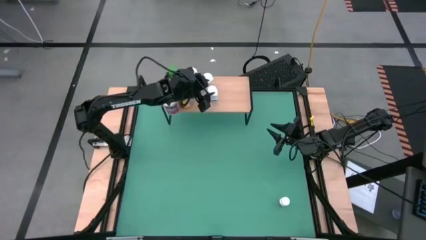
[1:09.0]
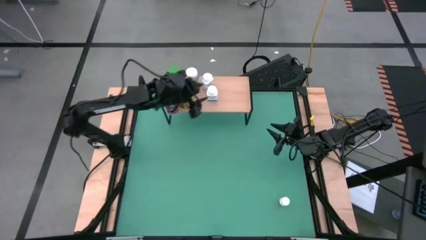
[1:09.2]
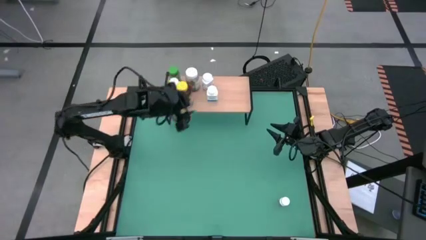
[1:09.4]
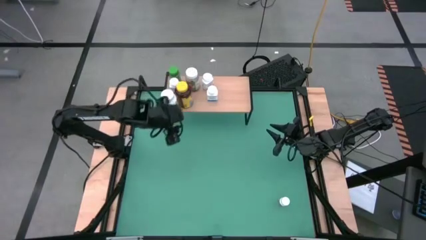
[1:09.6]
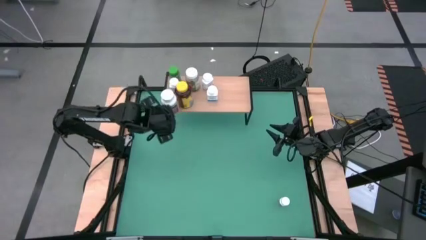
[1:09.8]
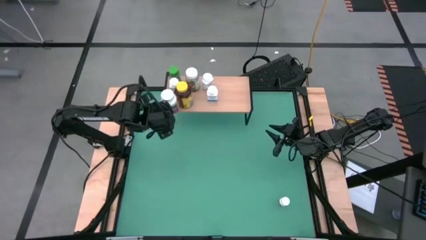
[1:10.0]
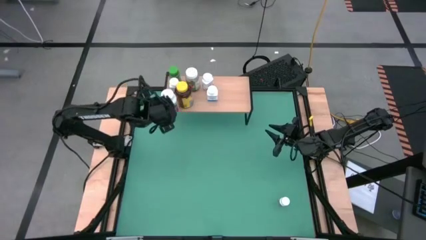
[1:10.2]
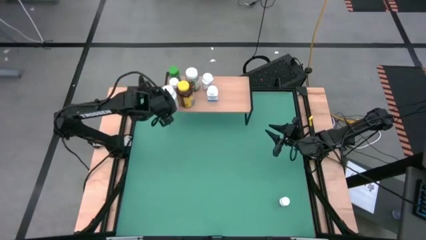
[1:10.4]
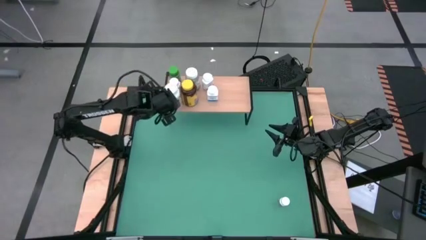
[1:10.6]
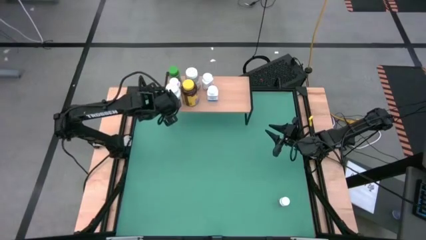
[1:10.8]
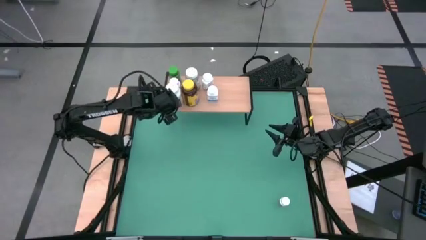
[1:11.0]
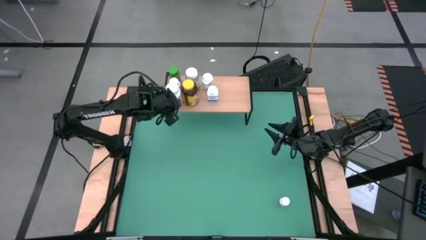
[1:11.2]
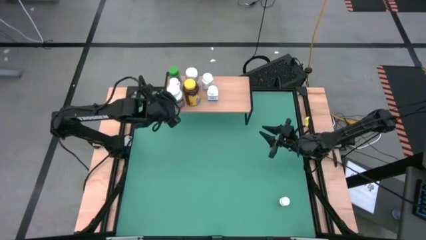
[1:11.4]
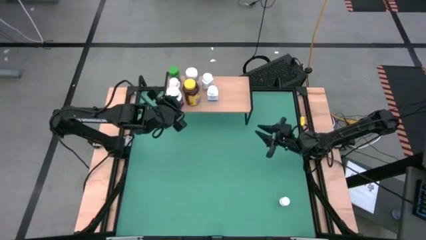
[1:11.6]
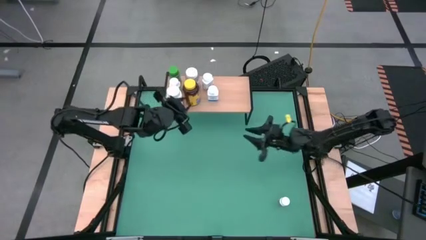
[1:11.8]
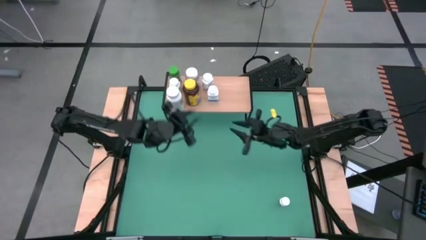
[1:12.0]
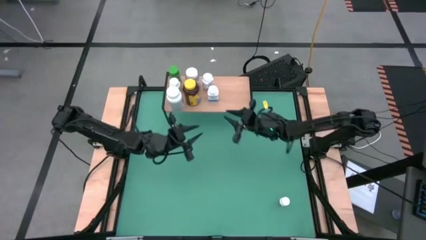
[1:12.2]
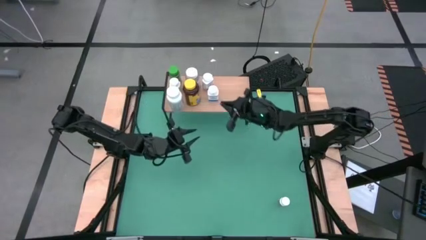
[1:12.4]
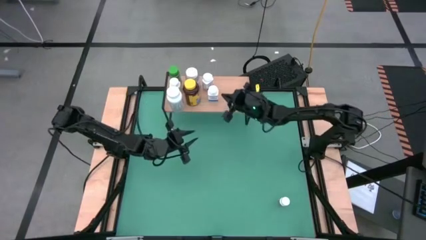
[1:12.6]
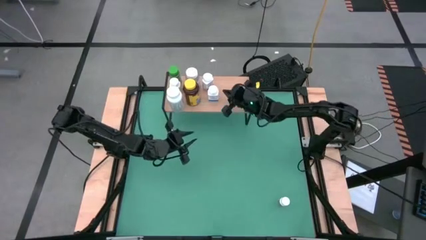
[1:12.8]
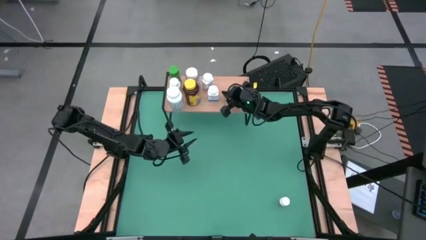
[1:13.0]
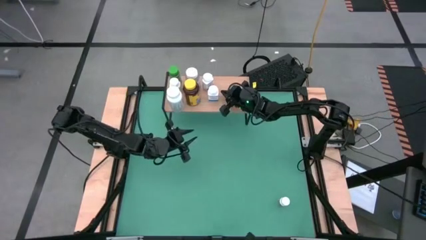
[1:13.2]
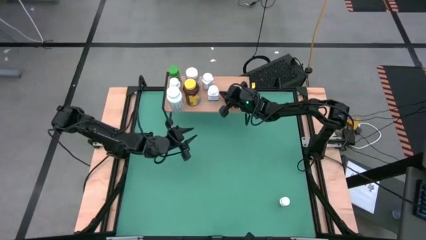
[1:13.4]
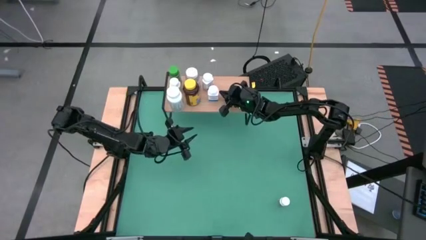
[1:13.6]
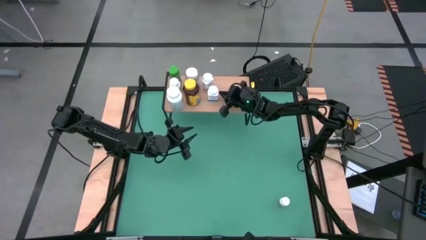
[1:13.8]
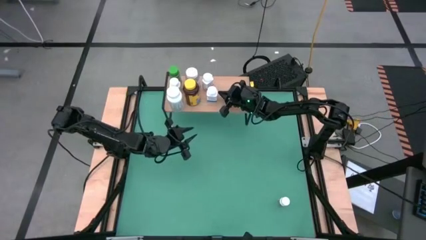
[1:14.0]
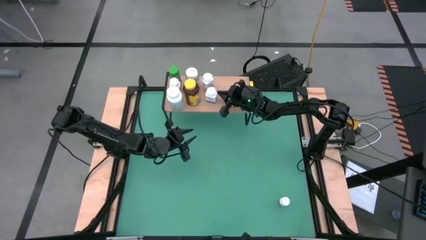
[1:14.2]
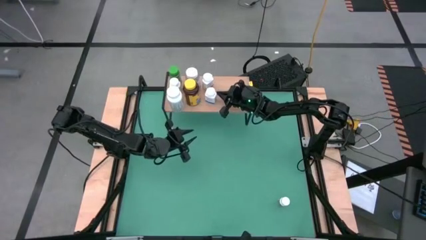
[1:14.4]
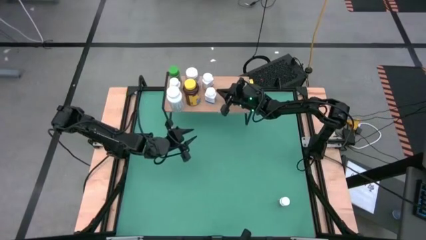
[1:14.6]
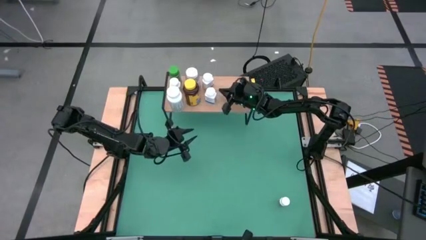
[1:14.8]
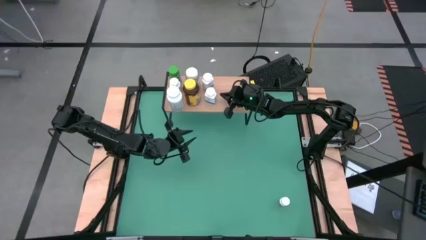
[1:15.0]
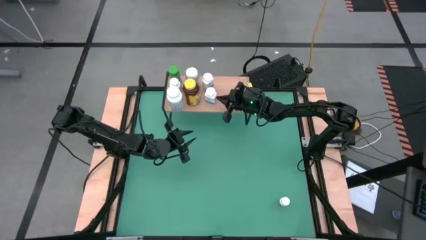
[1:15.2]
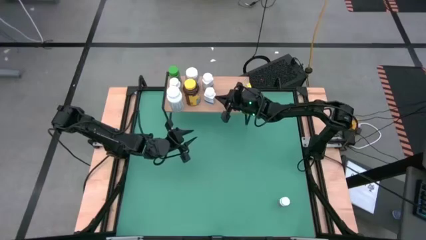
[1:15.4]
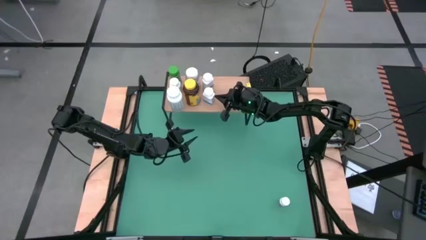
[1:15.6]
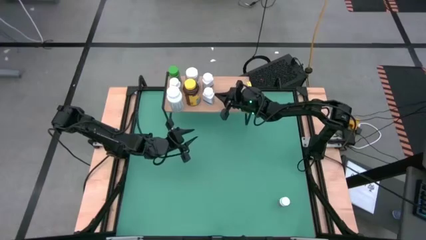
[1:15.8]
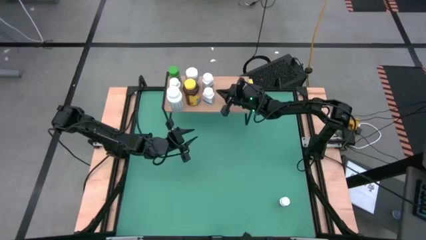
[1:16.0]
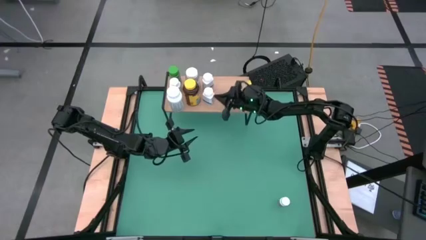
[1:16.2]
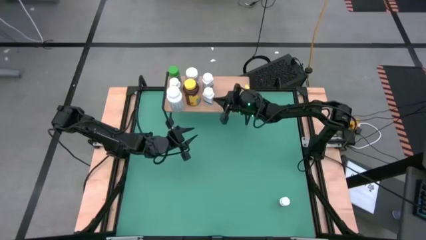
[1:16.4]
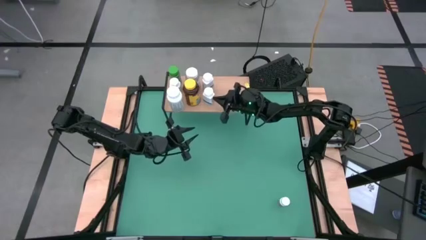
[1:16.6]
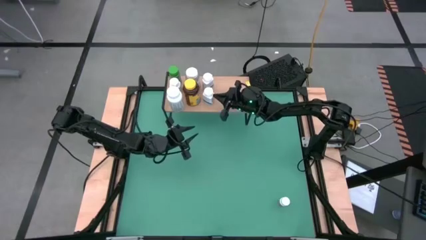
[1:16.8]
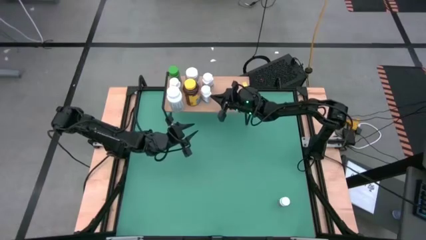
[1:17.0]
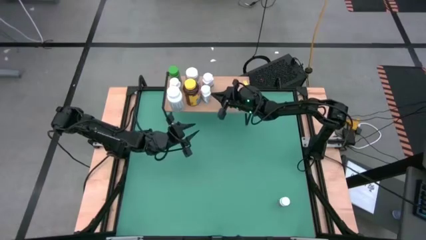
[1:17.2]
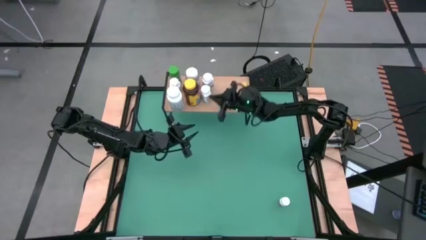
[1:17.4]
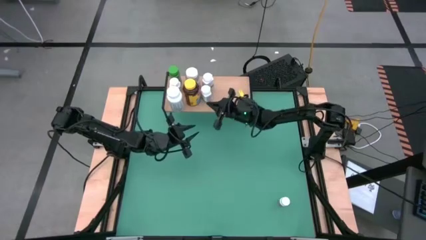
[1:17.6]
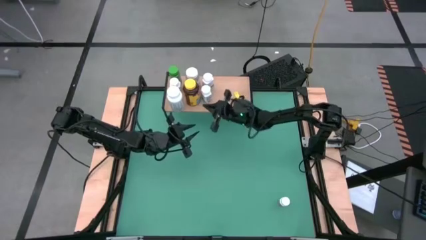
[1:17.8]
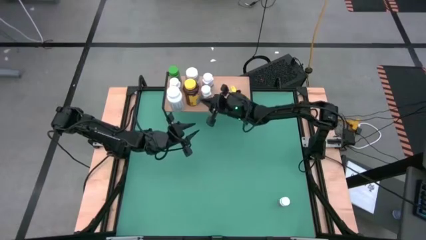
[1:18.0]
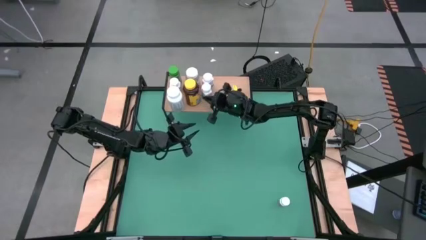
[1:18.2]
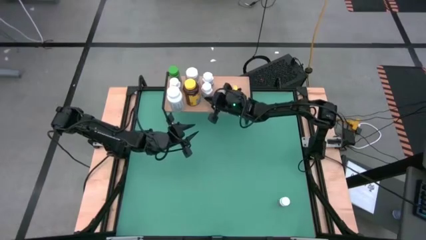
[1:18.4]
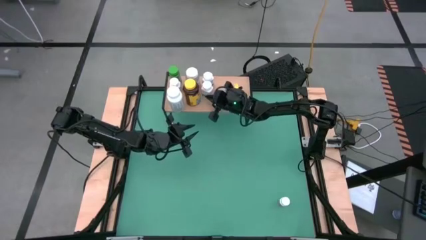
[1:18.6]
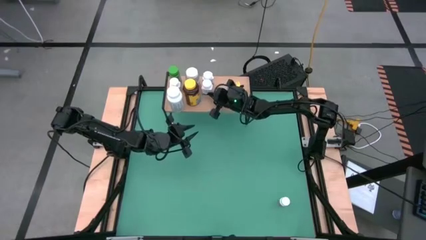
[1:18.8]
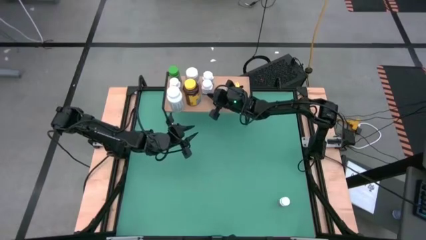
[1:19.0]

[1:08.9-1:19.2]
Task: Pick and place medicine bottles onto shelf by color
Adjust the white supplement bottles

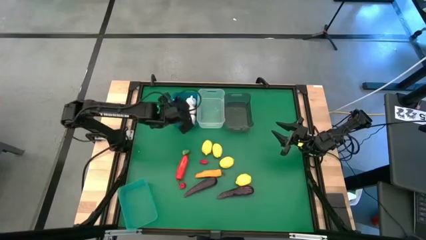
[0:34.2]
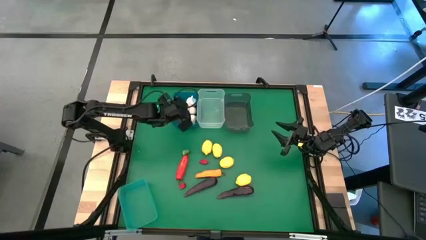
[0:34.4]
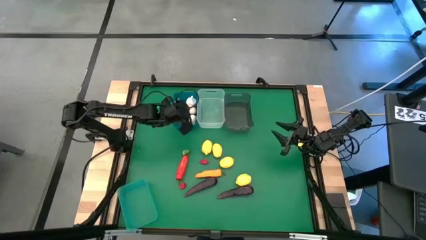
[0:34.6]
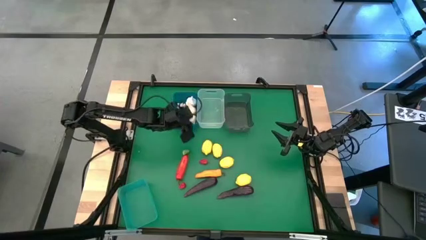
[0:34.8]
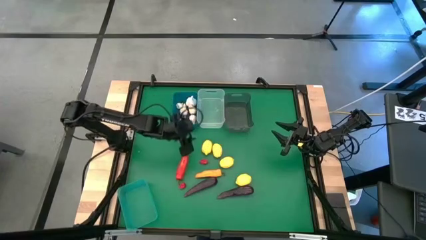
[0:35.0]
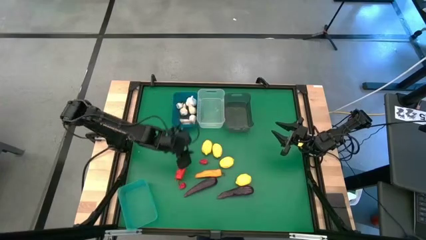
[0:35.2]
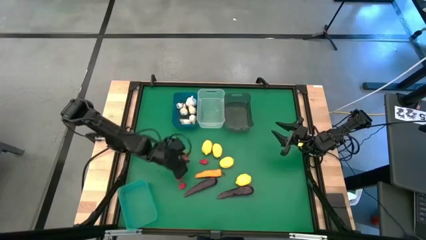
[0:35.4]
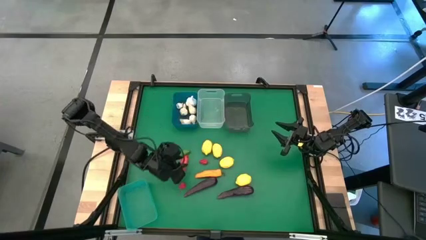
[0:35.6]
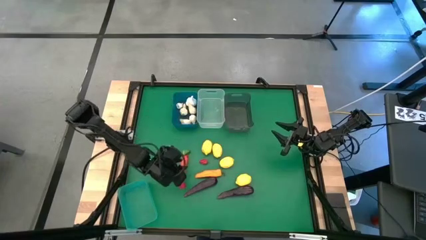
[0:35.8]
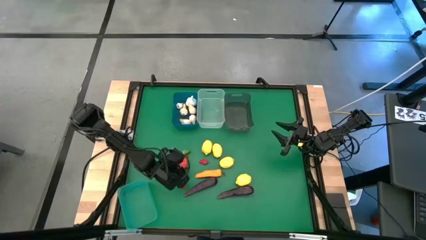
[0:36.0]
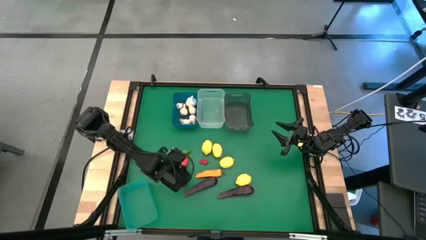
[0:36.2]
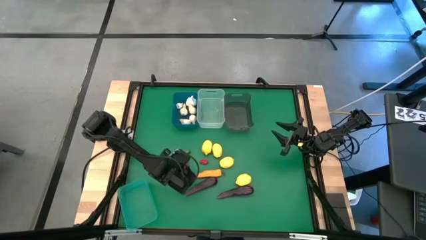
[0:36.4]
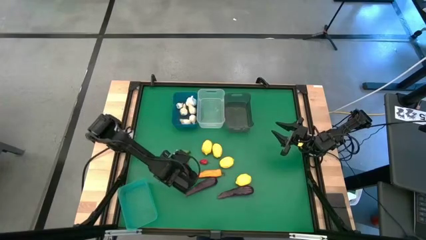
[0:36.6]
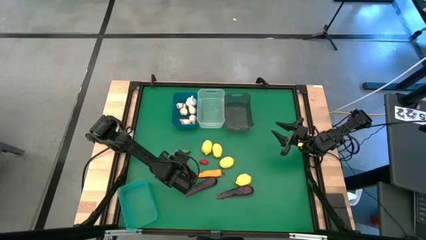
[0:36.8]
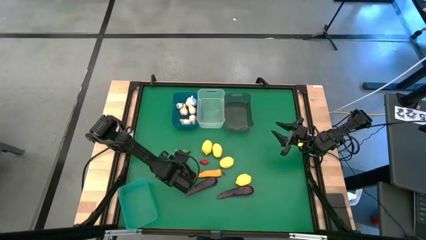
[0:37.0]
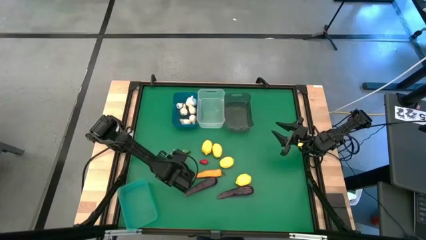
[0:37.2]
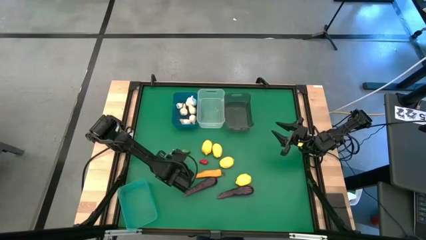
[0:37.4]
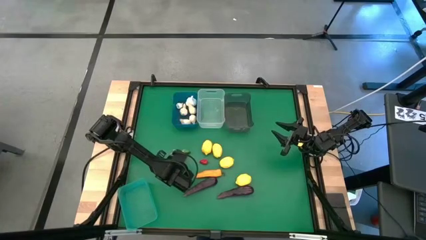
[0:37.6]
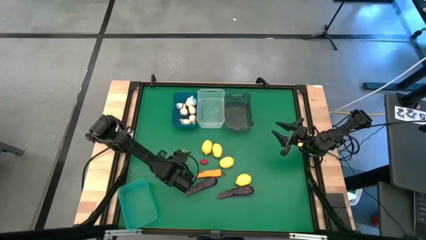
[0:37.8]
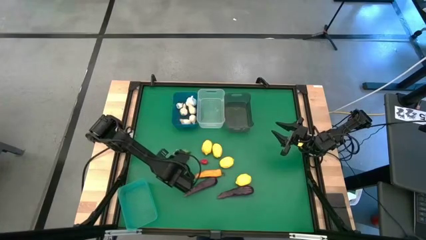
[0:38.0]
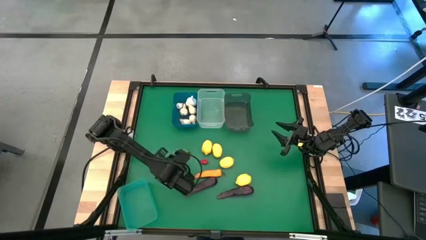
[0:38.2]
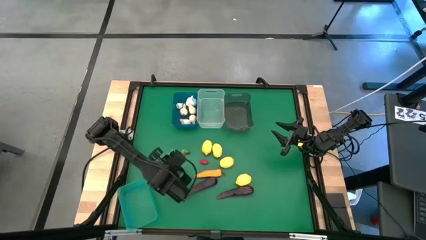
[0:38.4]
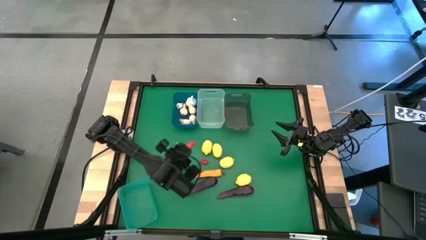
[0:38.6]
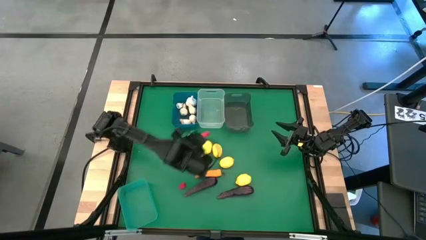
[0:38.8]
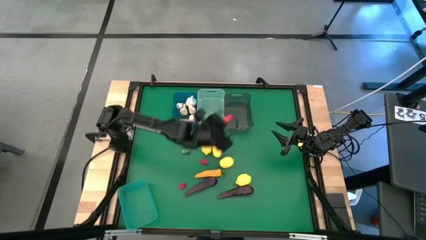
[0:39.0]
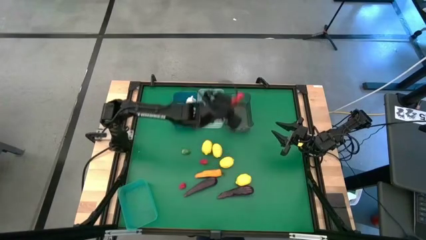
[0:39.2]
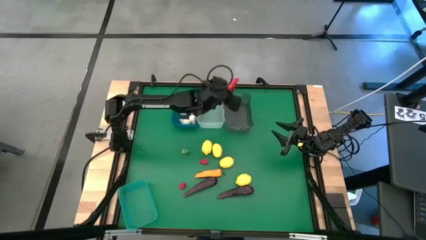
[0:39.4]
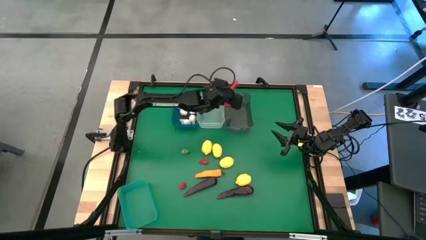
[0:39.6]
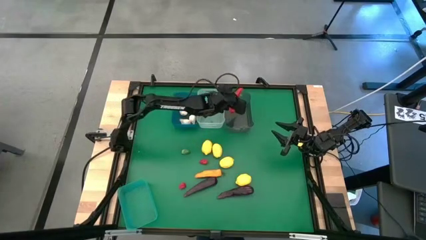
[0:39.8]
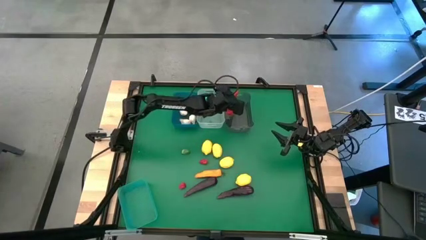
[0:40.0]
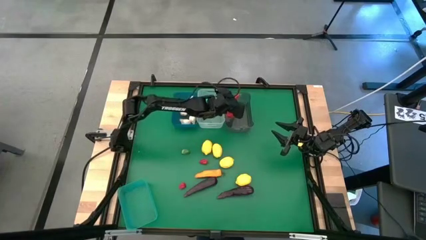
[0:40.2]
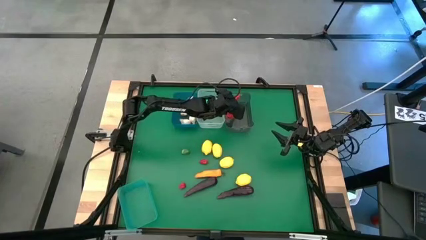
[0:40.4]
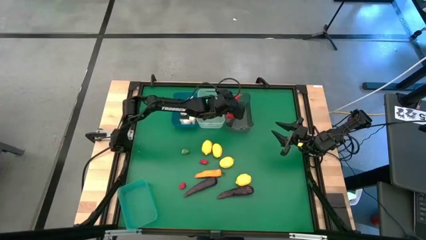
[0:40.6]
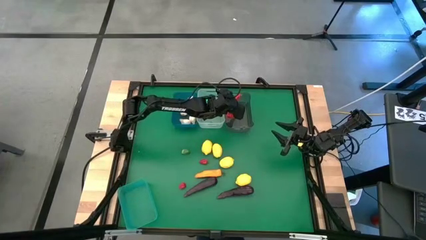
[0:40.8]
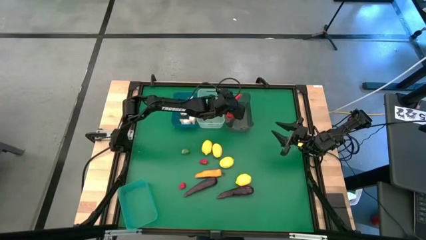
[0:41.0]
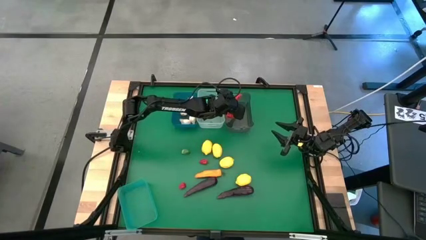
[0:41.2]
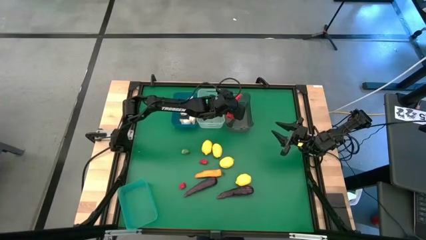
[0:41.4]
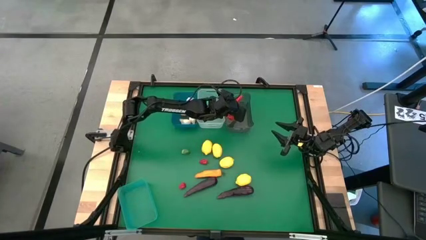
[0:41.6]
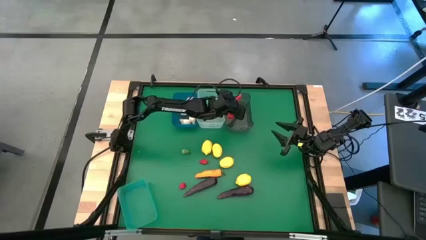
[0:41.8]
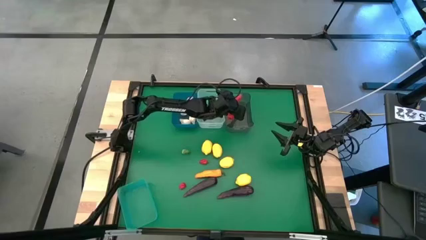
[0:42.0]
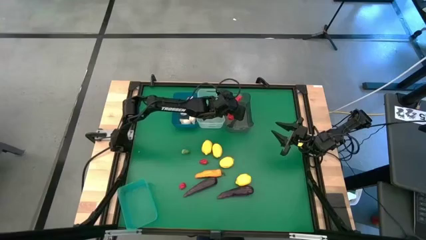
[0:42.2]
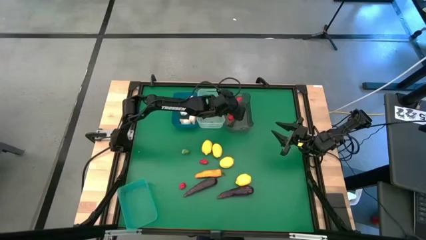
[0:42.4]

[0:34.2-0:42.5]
Task: Sort produce into baskets
Put the red chili pepper into the black bin
